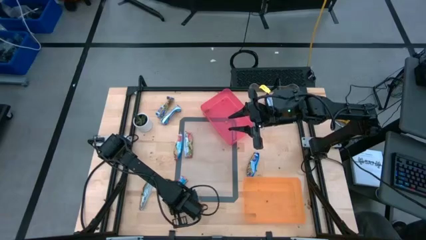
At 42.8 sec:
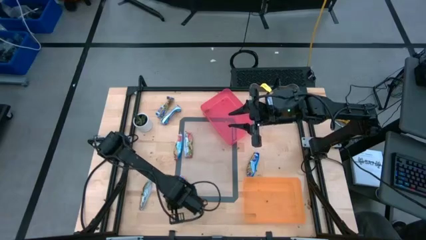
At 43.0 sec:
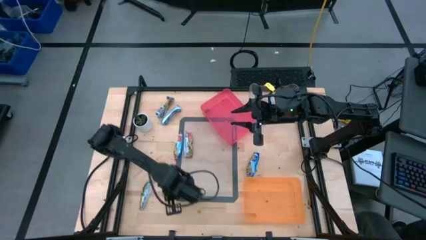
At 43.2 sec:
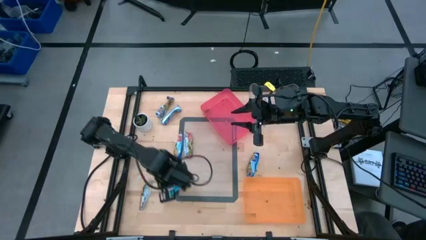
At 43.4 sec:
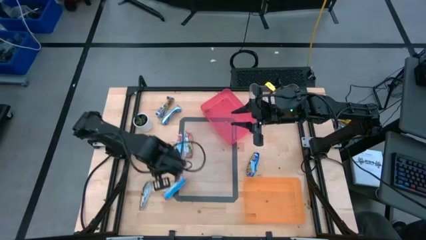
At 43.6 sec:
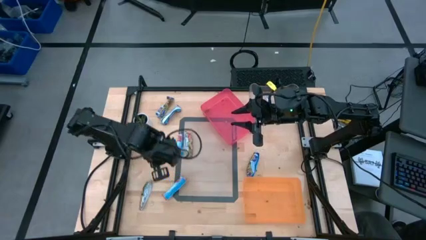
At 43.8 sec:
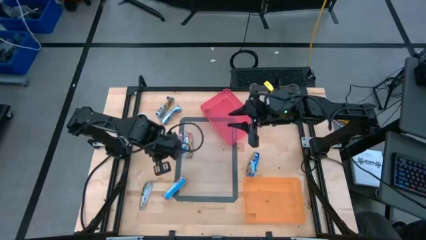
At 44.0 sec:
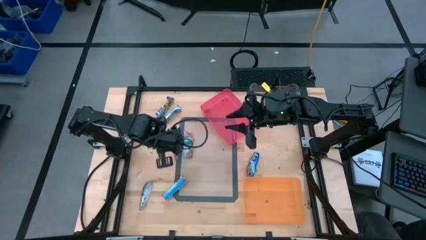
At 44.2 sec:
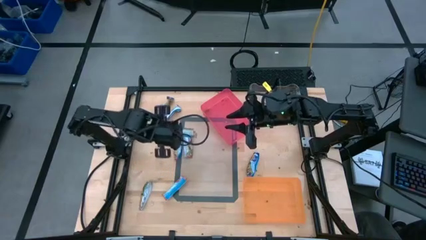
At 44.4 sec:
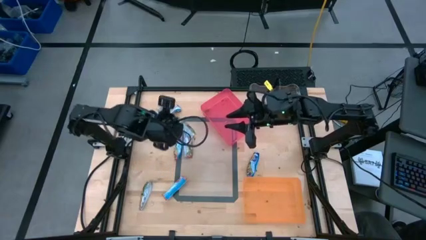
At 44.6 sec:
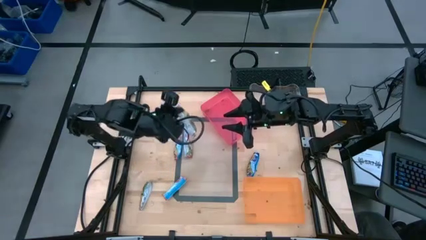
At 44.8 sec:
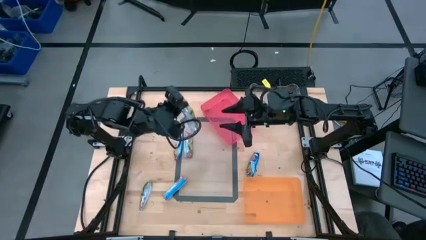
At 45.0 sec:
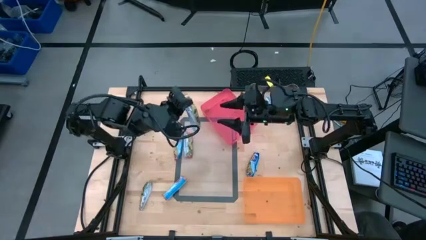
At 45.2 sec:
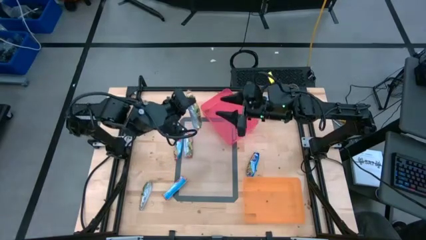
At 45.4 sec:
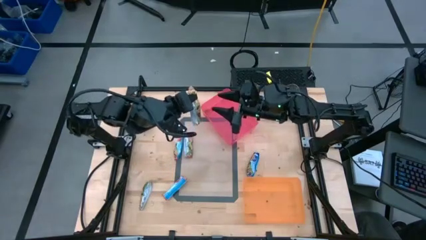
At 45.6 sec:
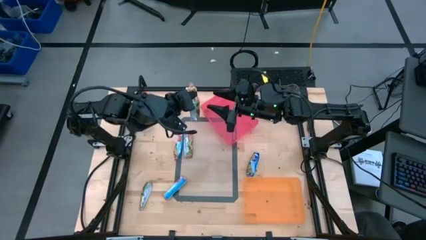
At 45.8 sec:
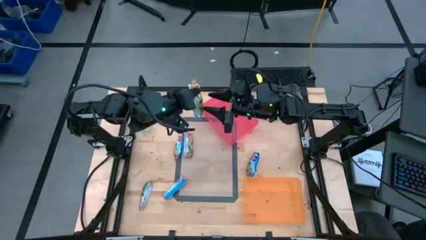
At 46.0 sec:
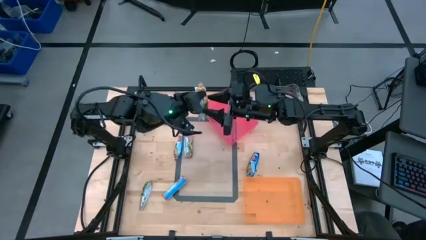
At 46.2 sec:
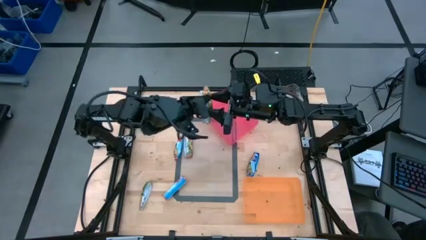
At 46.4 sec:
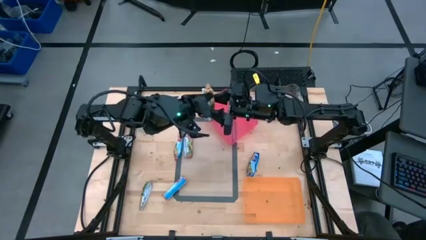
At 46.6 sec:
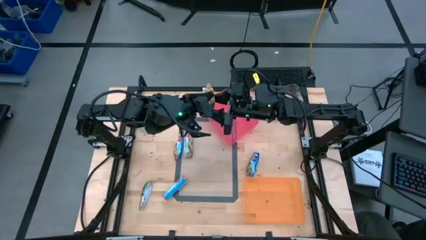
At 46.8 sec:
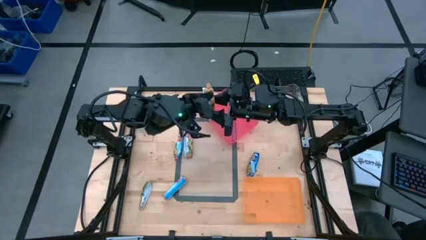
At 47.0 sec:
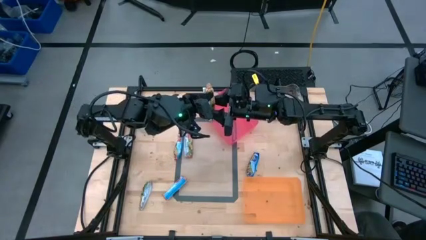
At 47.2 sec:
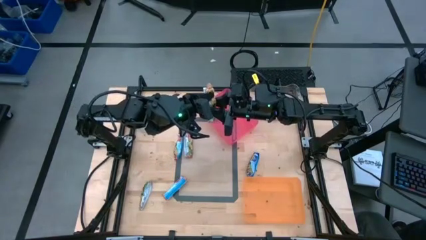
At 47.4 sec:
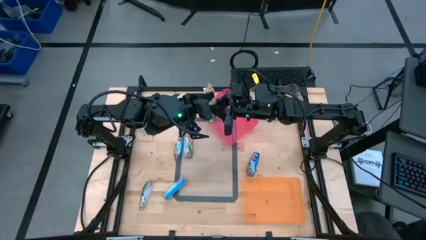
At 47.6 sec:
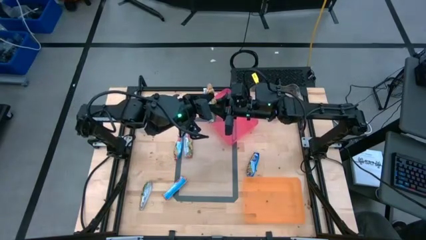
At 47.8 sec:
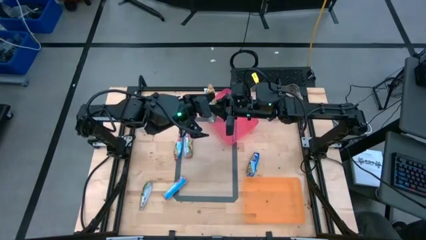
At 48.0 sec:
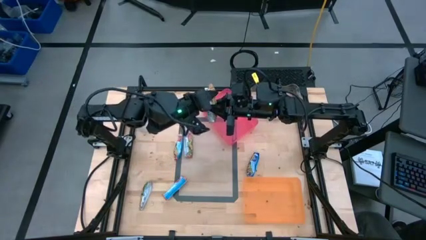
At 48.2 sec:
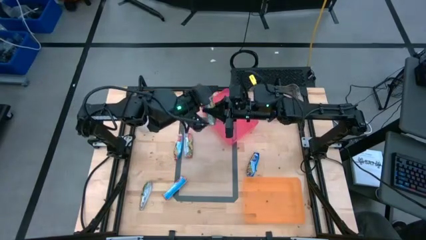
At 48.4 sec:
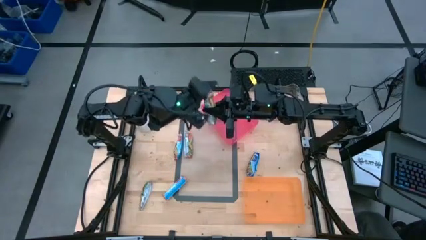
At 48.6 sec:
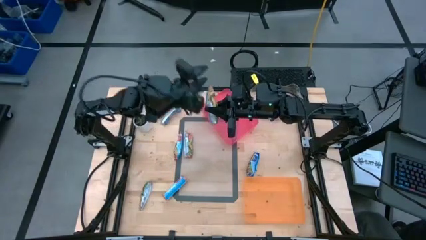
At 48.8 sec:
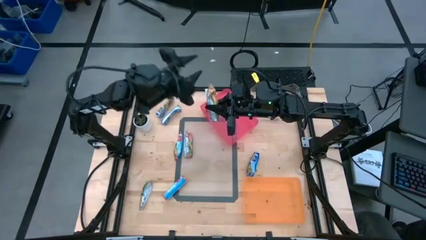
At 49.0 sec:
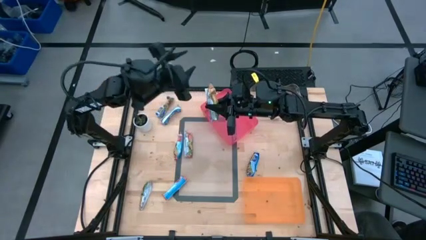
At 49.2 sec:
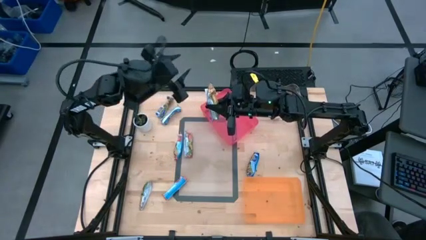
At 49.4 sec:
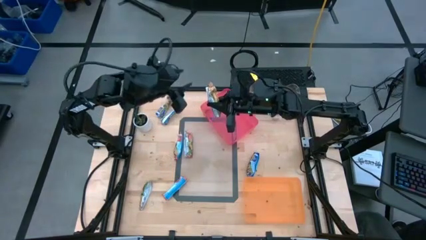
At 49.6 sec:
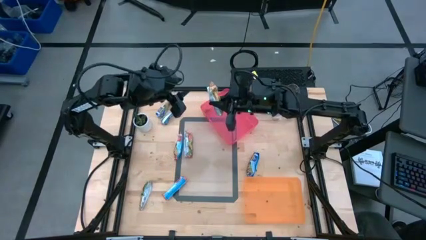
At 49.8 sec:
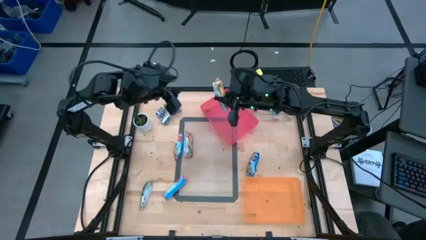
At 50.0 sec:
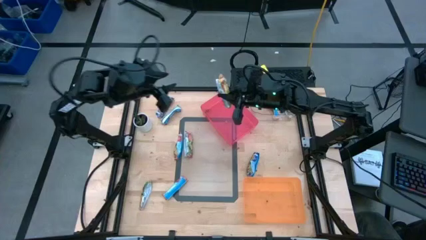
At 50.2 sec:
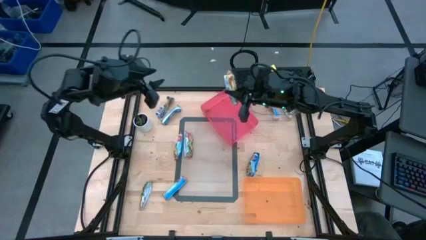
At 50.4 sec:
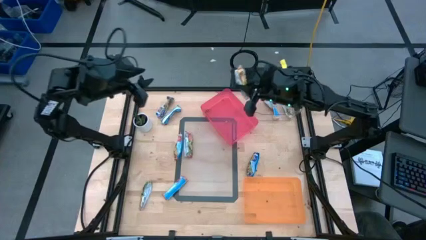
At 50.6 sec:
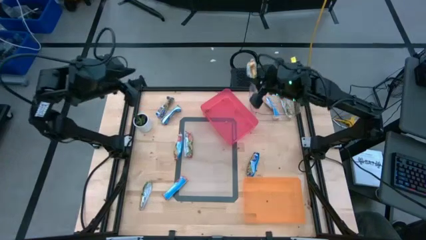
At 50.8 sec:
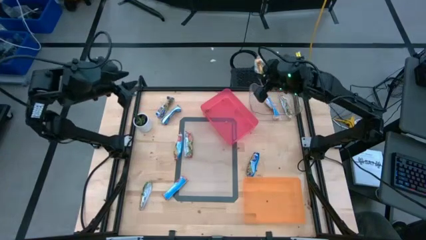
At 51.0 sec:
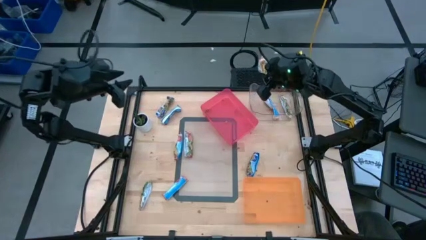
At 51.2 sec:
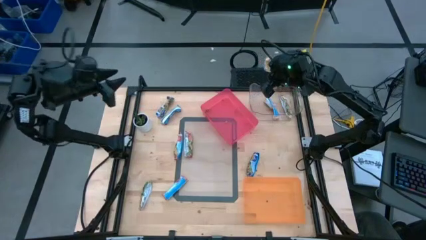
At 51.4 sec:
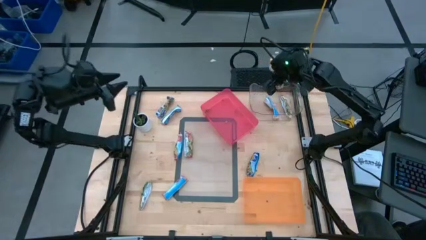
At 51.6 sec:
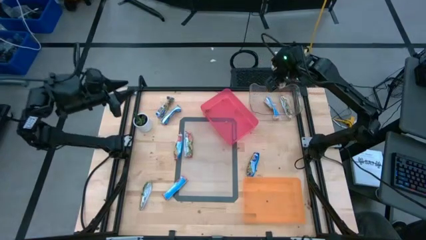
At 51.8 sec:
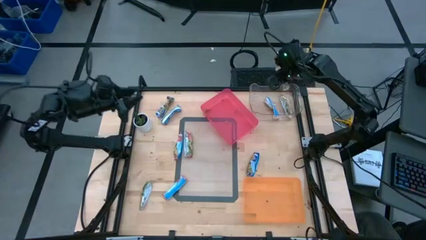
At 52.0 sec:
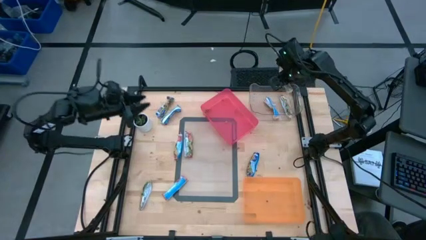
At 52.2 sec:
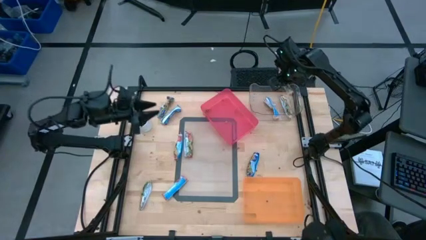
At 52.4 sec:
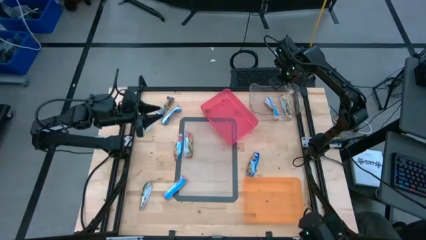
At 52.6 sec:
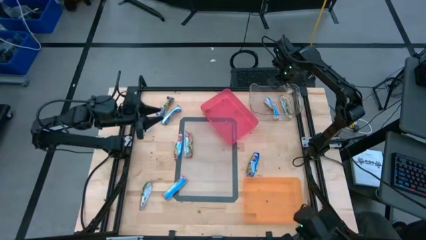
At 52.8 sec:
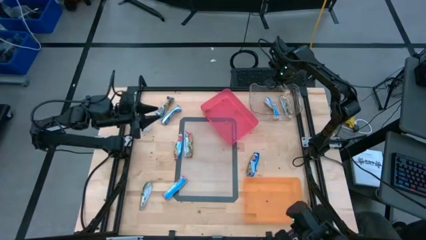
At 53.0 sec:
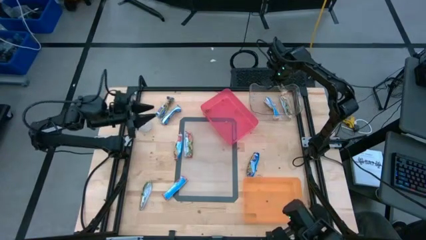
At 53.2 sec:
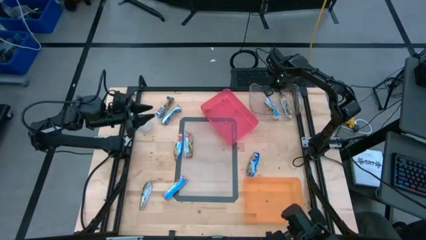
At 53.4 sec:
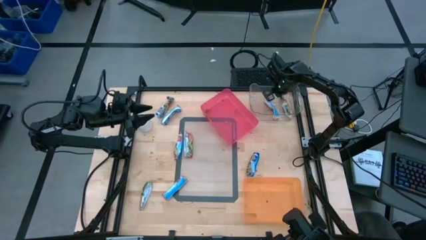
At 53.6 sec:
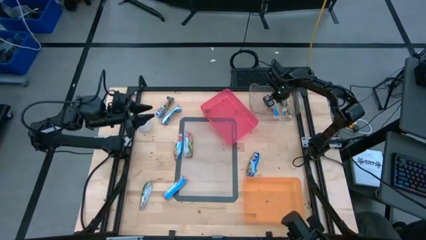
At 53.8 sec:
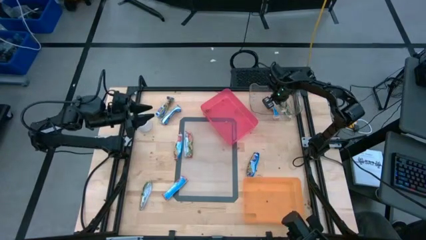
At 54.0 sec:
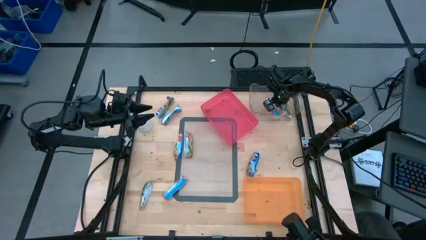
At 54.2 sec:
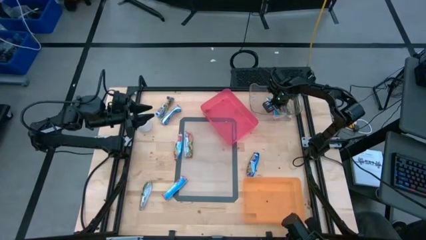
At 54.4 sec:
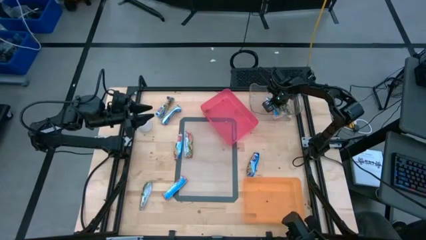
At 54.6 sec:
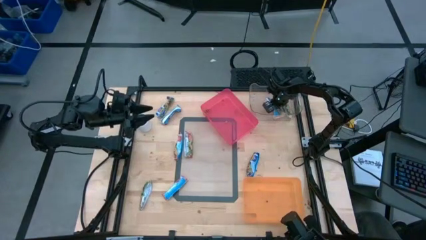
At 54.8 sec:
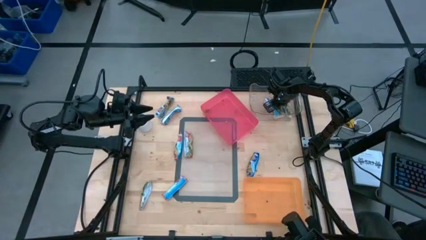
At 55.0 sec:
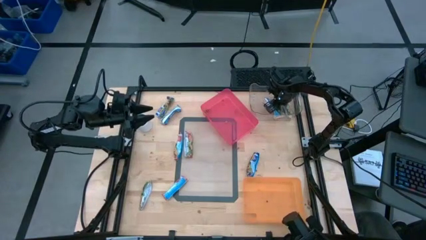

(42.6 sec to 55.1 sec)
Task: Pick and place Granola Bars by type
Put the yellow granola bar into the transparent bin
